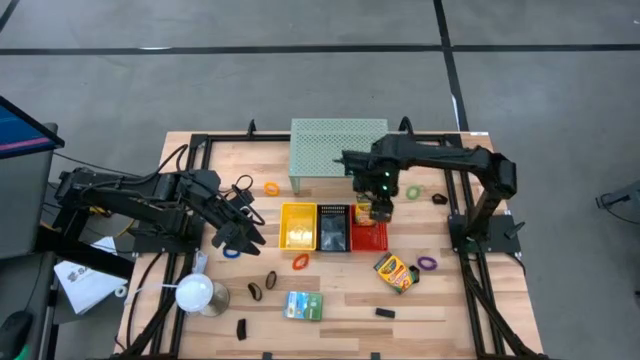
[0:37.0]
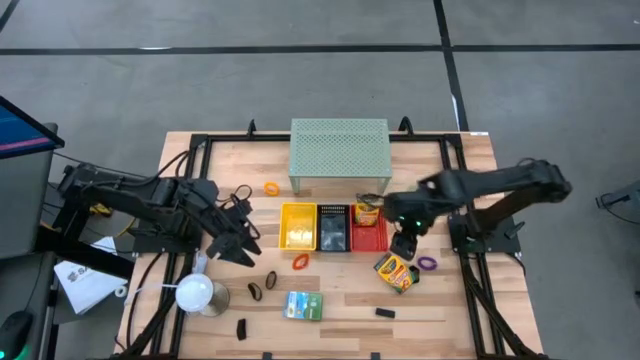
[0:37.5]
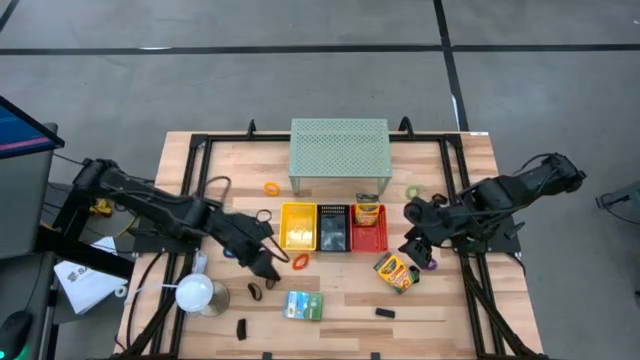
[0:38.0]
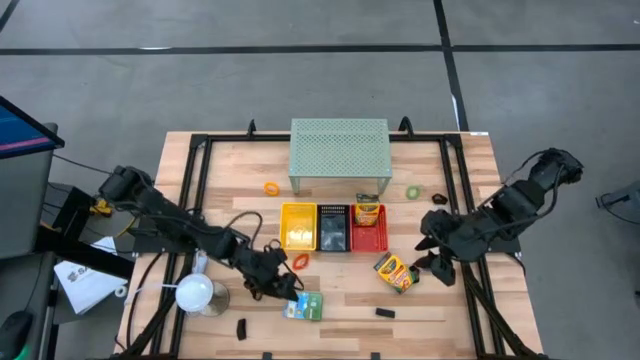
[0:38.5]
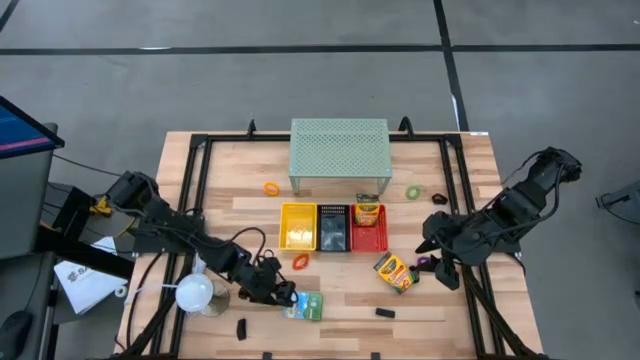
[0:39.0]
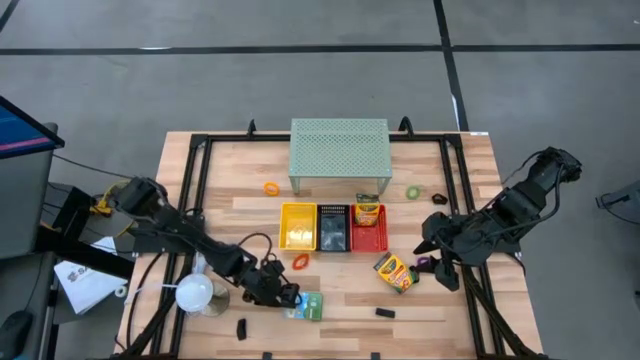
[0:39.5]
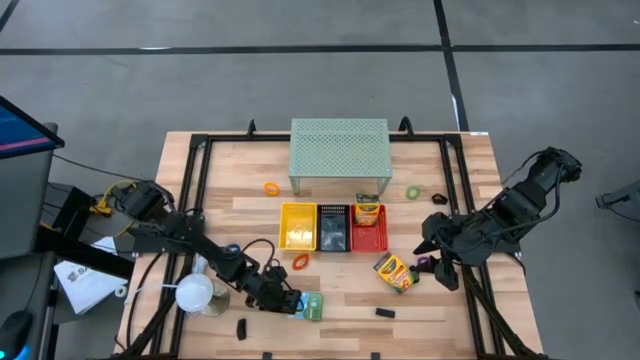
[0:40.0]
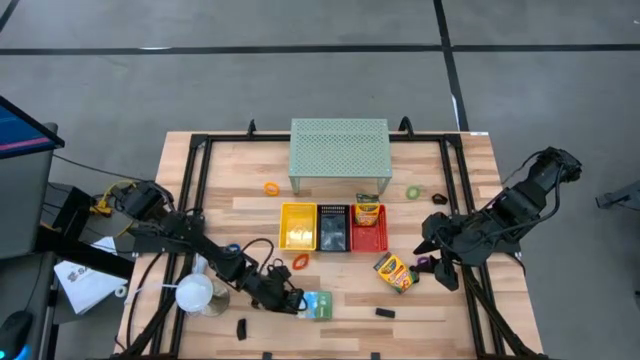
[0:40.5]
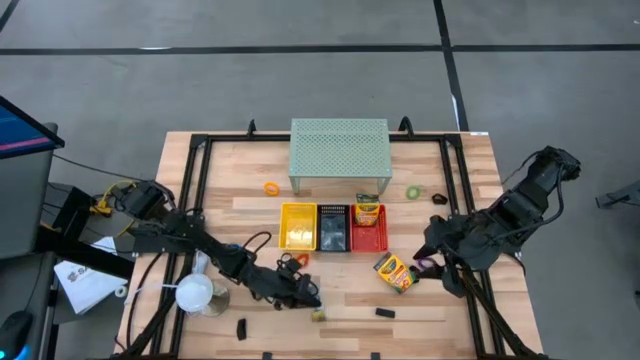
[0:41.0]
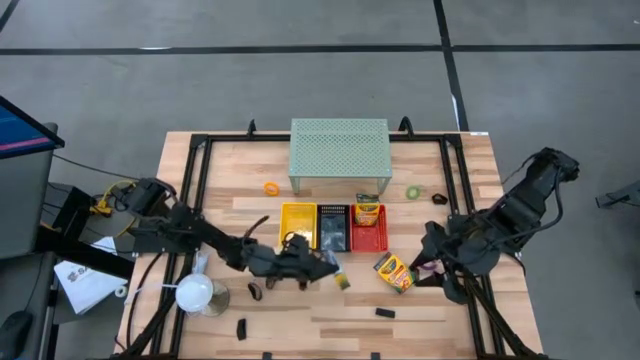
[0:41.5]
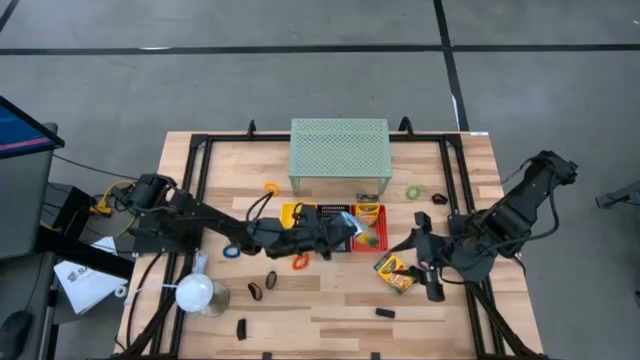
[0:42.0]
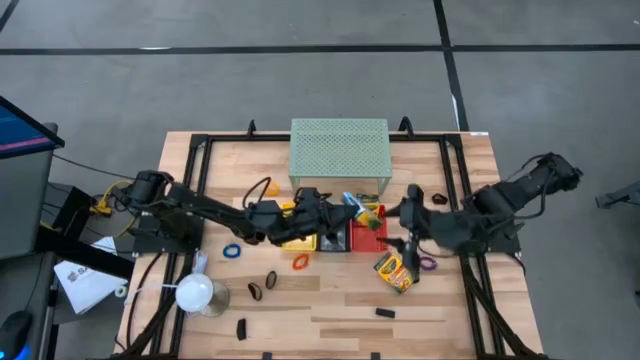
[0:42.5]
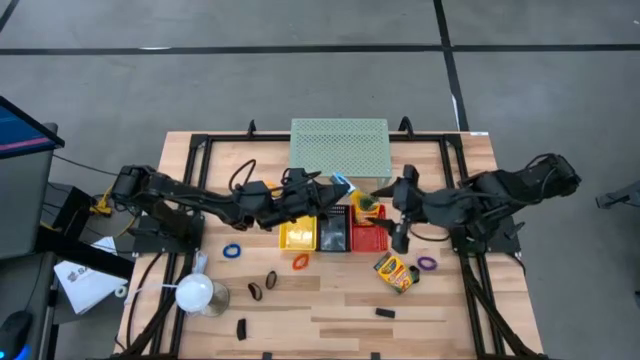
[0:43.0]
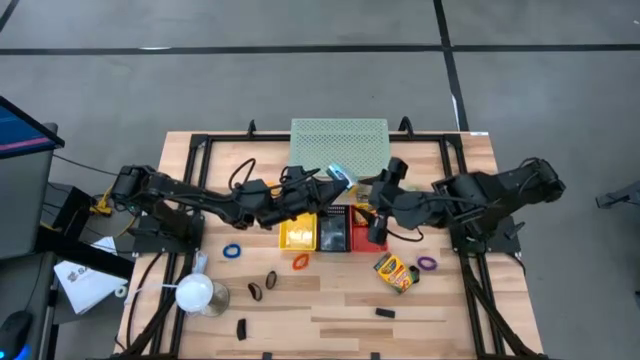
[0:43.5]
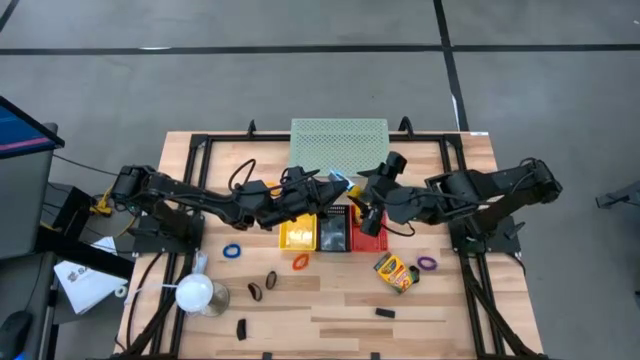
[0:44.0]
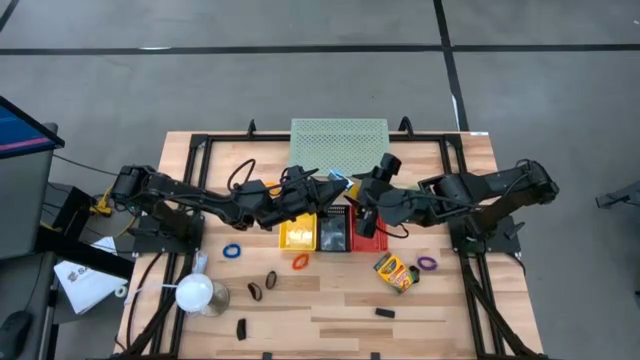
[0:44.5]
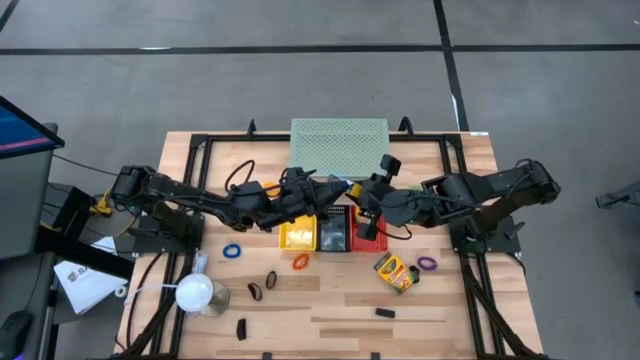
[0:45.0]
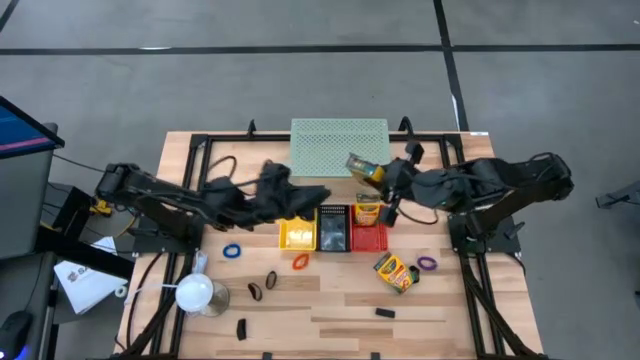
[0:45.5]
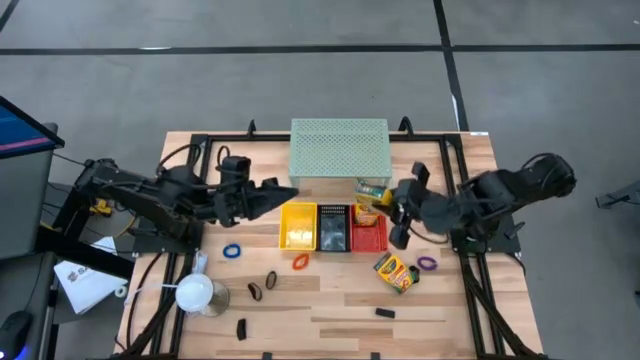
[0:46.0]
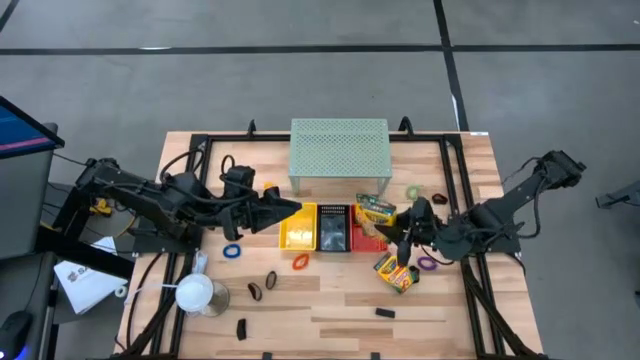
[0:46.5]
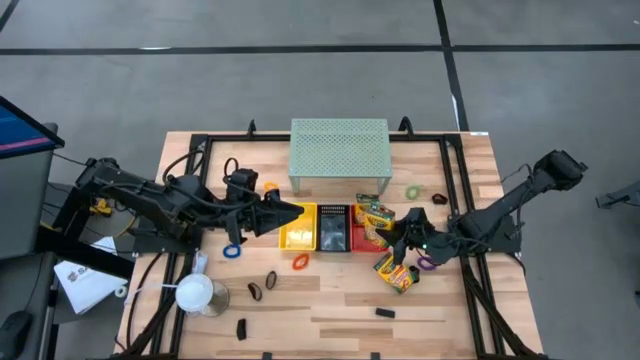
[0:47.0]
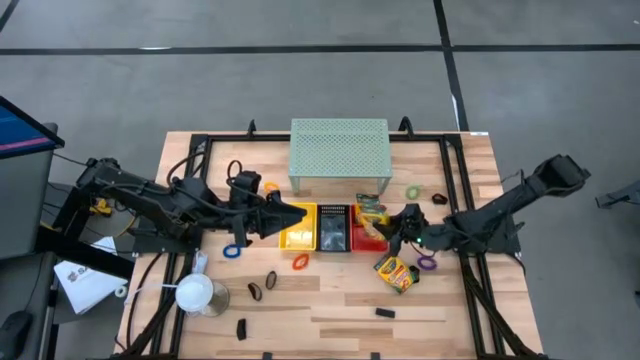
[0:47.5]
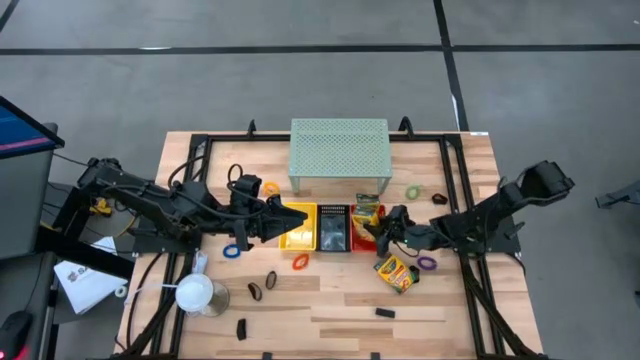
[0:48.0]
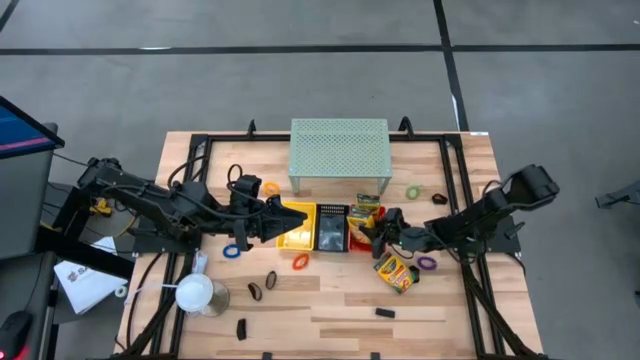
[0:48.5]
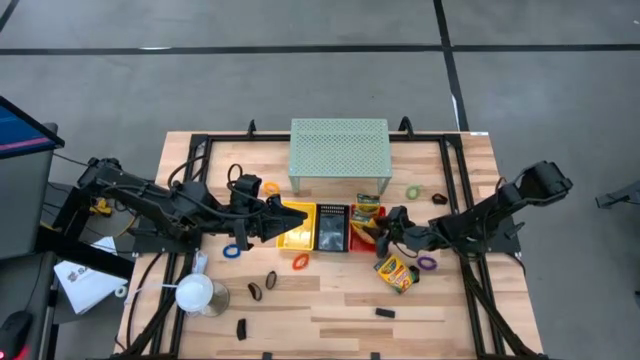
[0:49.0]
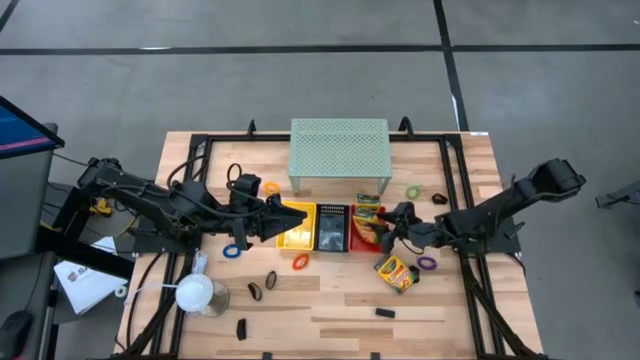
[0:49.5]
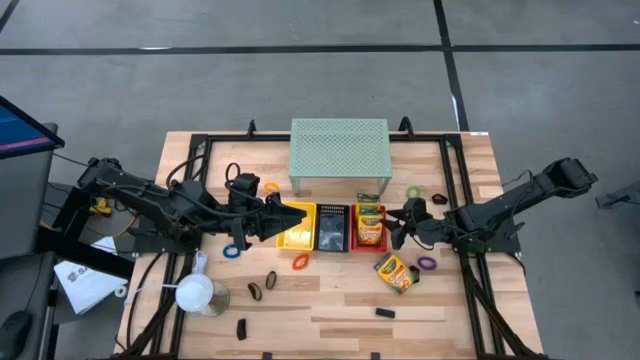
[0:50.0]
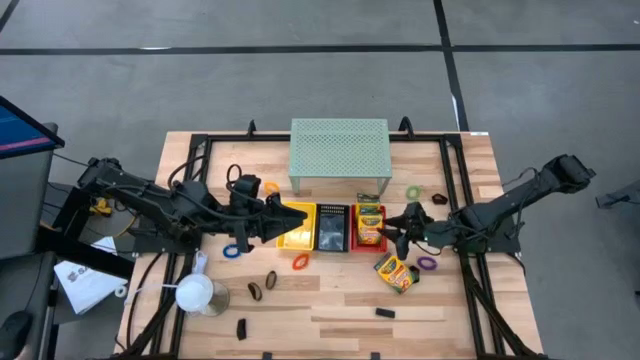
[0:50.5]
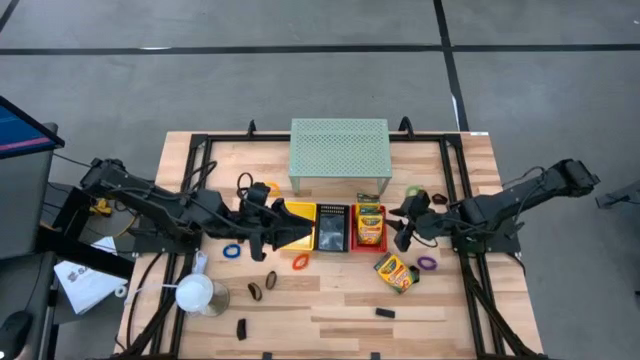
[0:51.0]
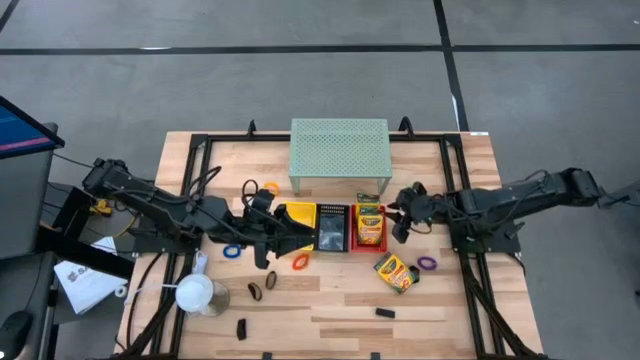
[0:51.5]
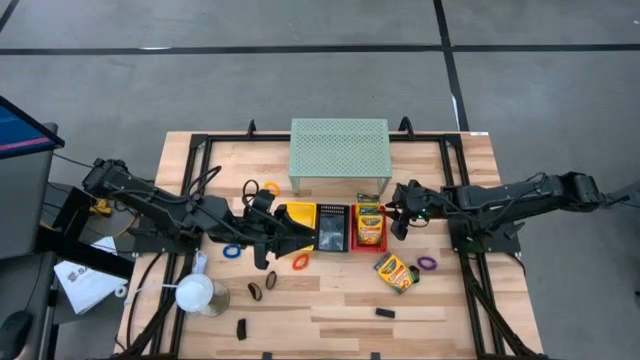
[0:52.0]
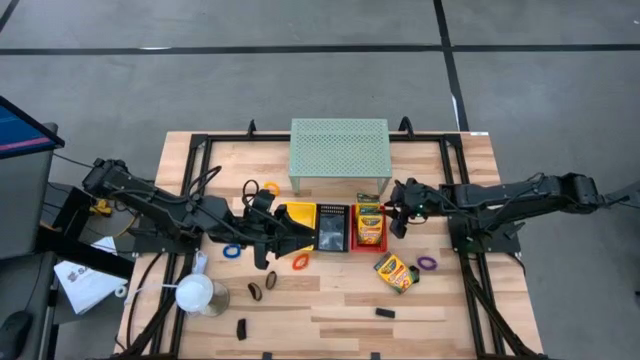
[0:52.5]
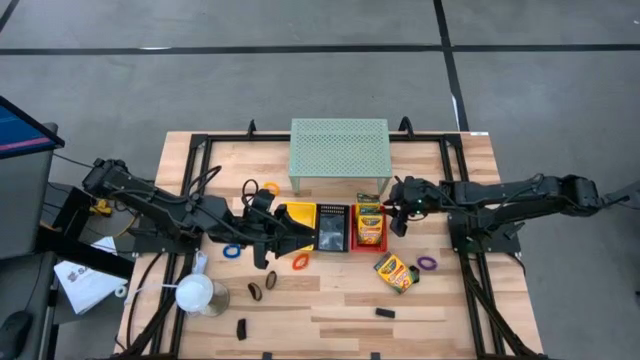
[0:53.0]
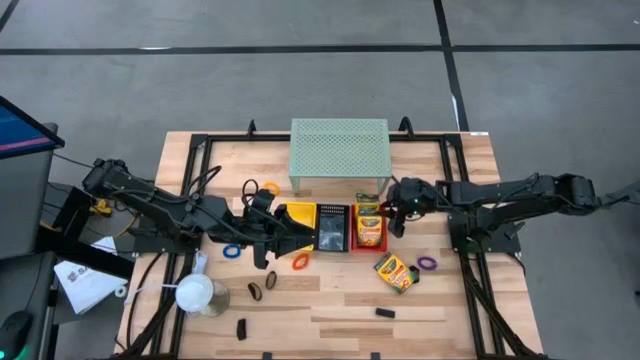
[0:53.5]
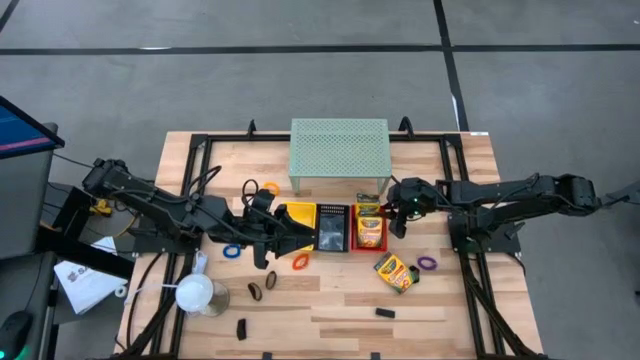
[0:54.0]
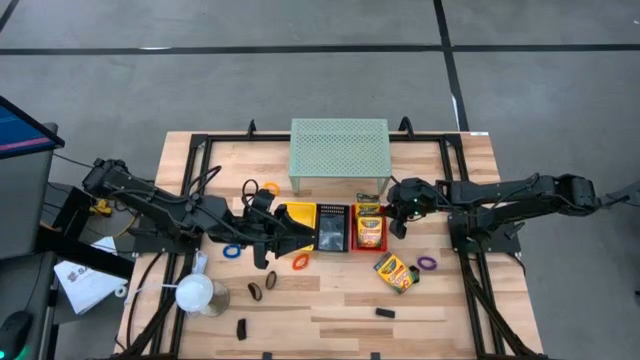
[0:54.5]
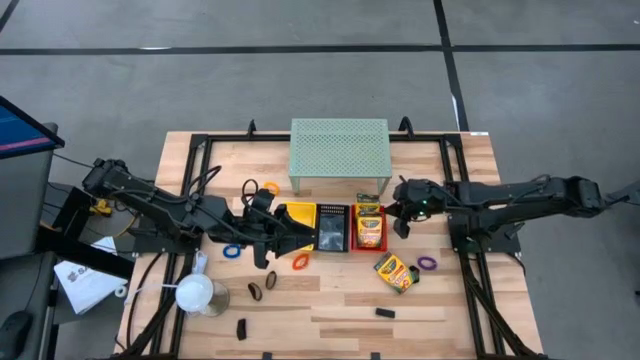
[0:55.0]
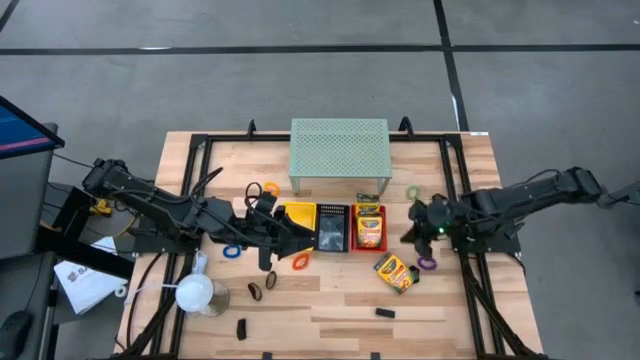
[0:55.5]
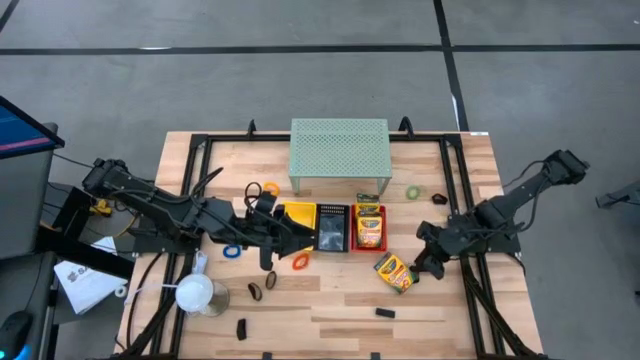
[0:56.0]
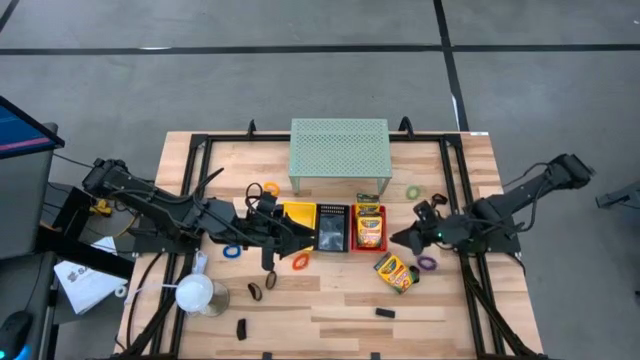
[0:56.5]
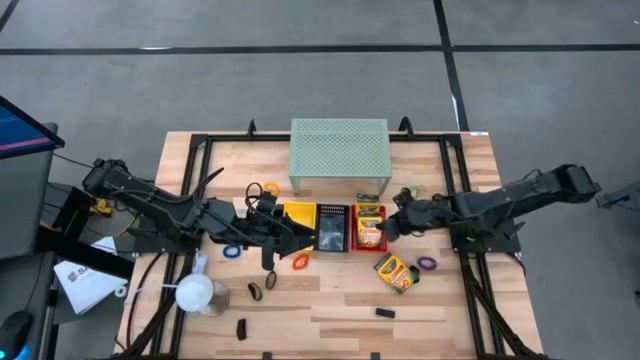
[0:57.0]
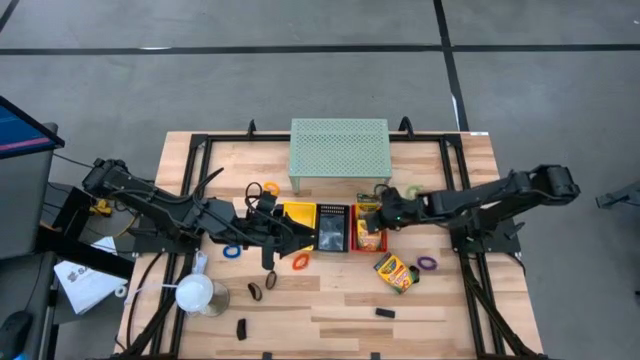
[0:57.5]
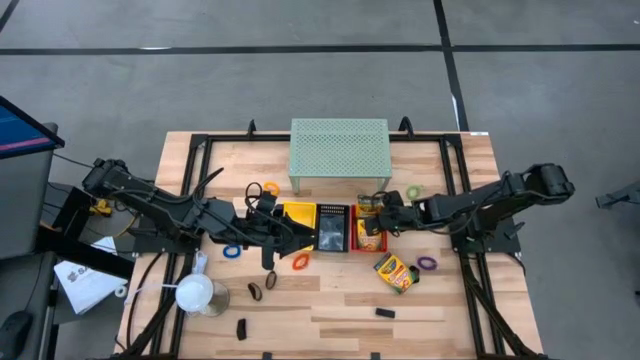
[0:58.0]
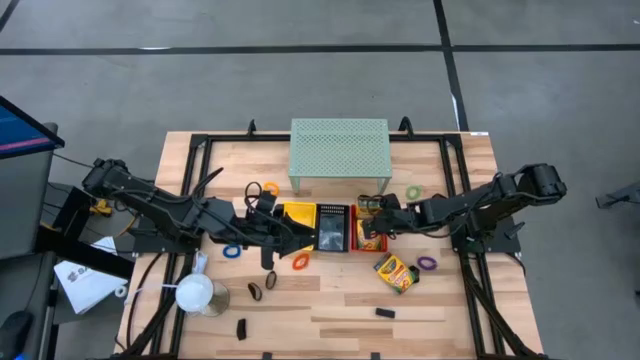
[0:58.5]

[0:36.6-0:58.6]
Task: Pick & Place Office Desk Supplies
Put the crayons box into the red bin
